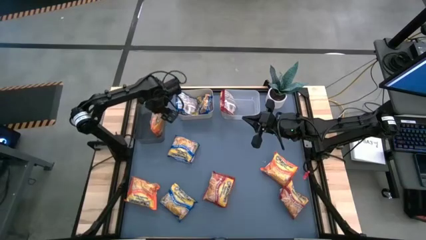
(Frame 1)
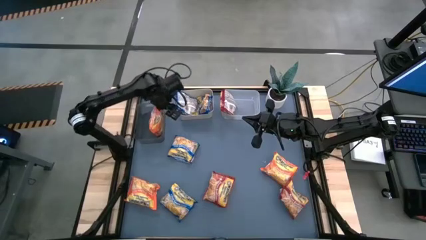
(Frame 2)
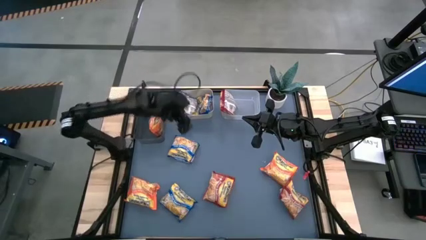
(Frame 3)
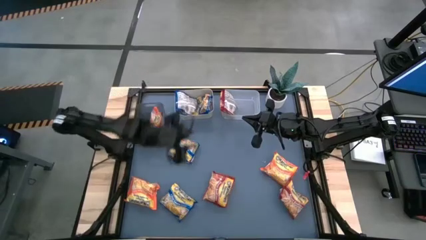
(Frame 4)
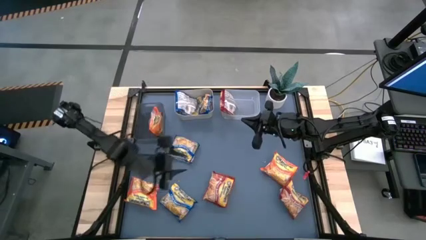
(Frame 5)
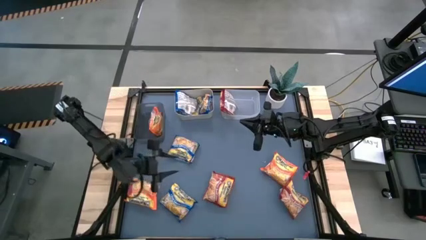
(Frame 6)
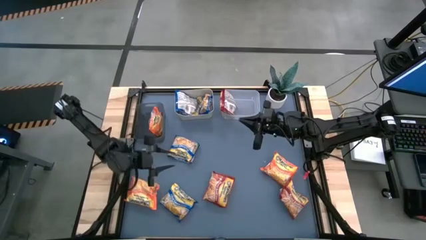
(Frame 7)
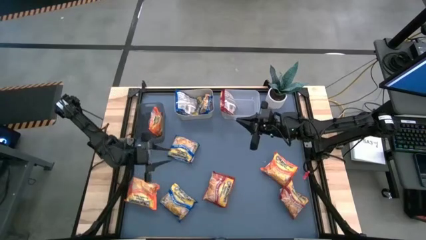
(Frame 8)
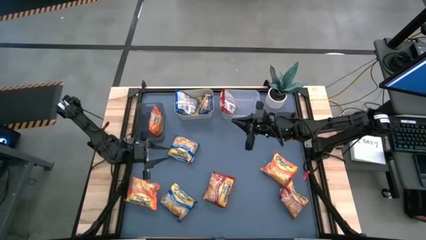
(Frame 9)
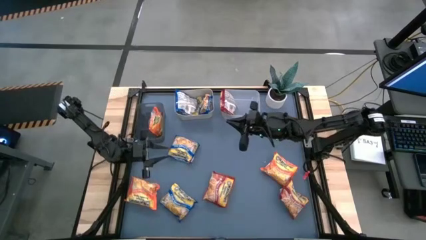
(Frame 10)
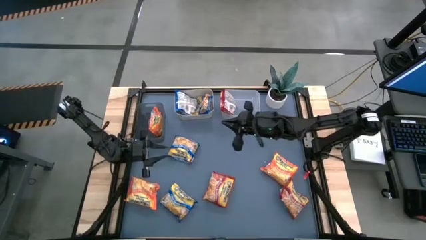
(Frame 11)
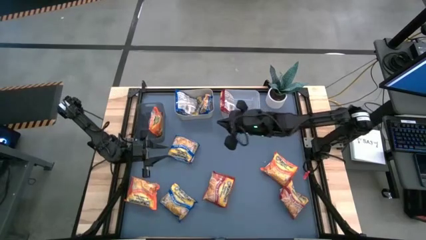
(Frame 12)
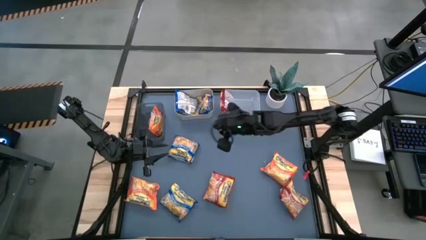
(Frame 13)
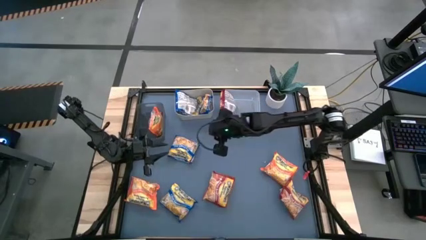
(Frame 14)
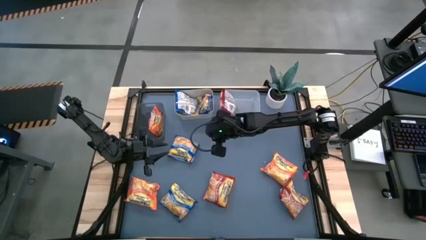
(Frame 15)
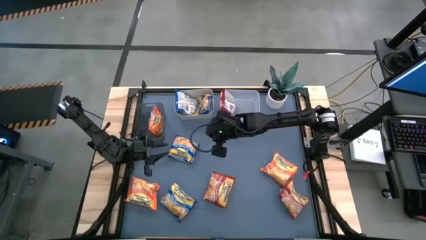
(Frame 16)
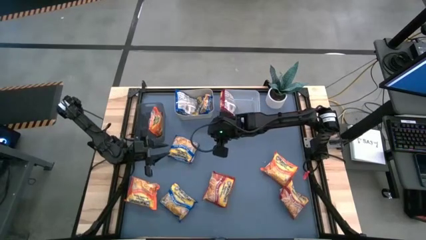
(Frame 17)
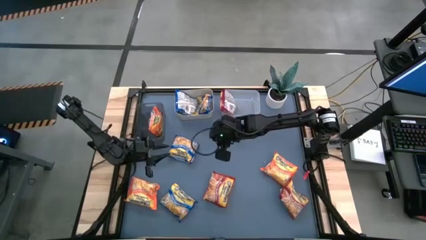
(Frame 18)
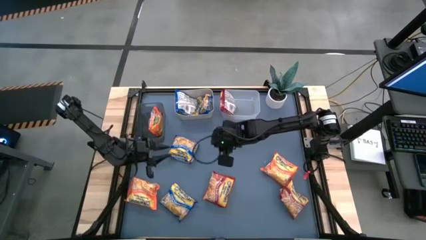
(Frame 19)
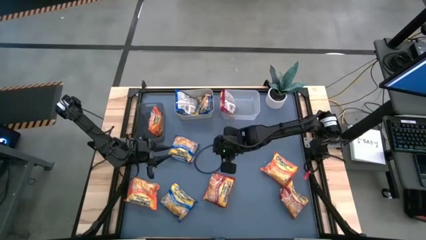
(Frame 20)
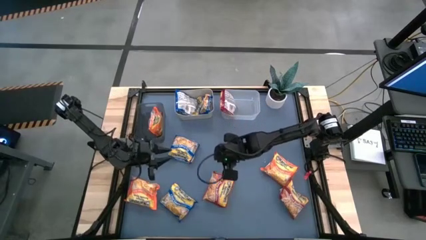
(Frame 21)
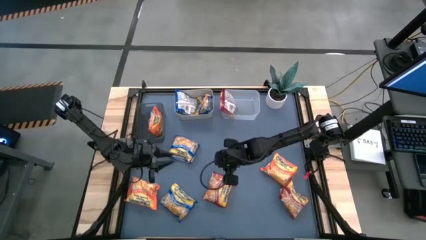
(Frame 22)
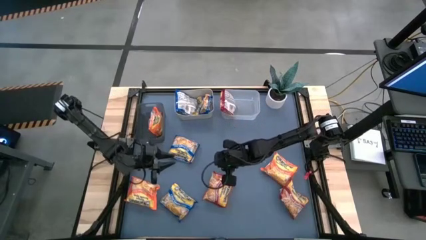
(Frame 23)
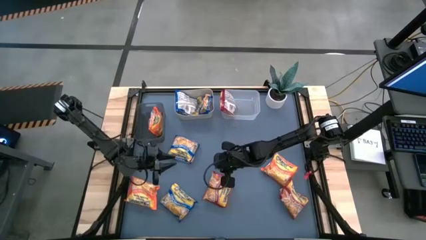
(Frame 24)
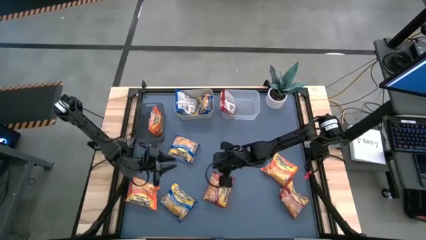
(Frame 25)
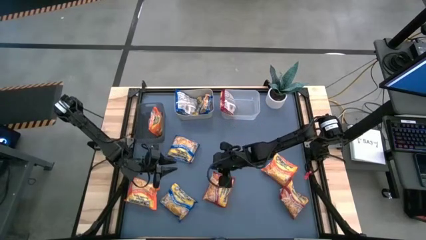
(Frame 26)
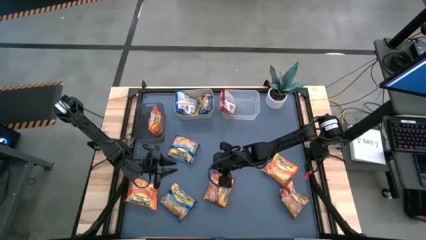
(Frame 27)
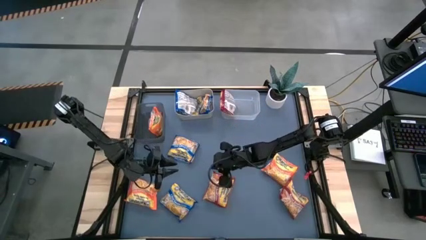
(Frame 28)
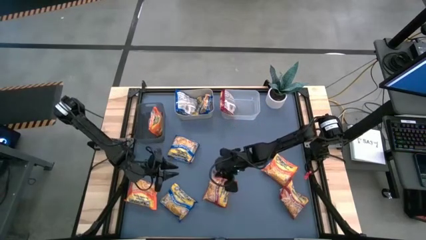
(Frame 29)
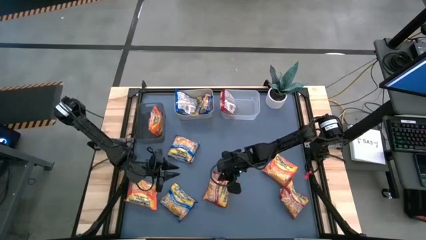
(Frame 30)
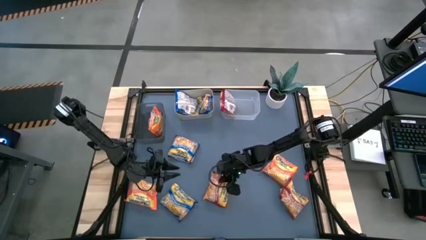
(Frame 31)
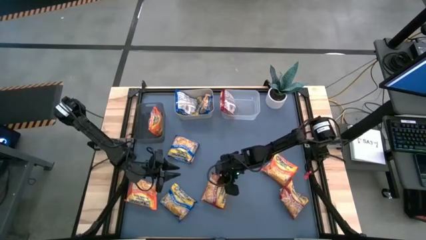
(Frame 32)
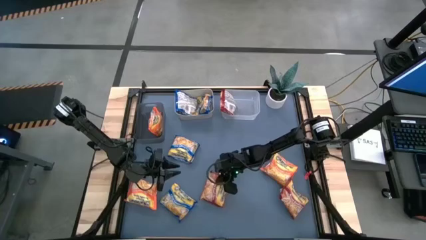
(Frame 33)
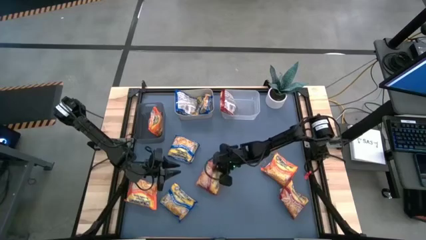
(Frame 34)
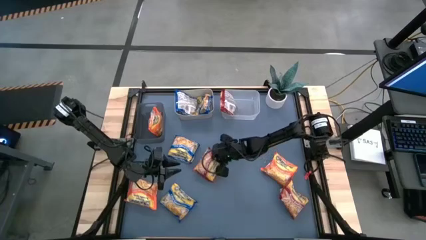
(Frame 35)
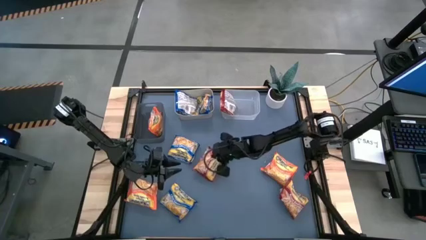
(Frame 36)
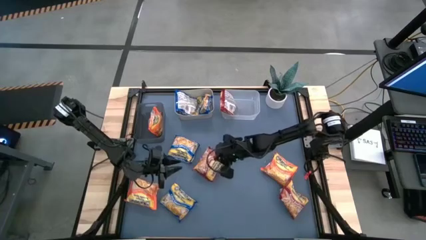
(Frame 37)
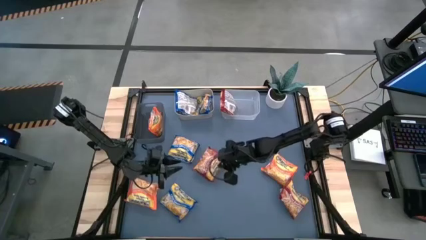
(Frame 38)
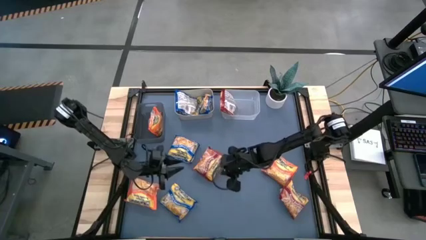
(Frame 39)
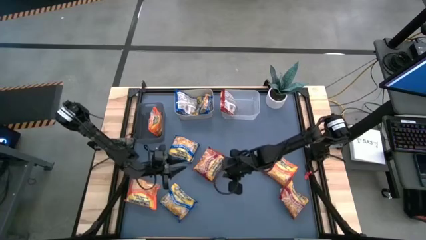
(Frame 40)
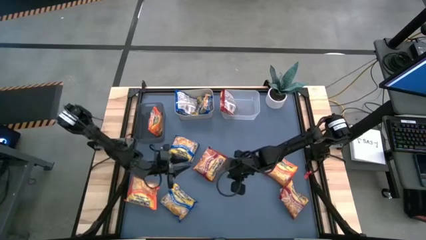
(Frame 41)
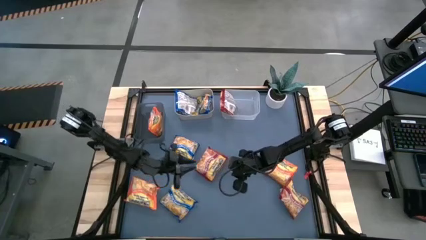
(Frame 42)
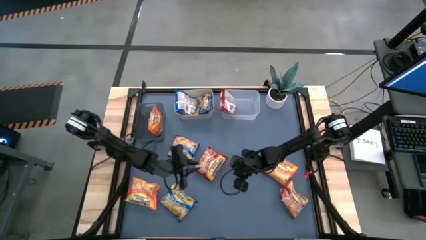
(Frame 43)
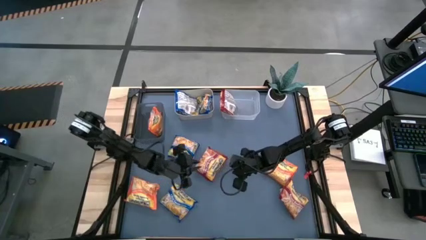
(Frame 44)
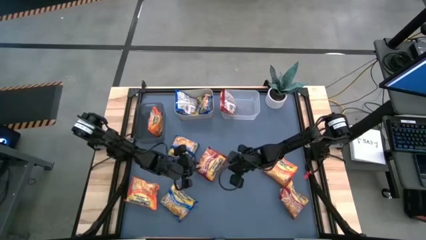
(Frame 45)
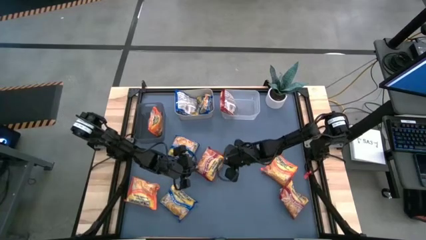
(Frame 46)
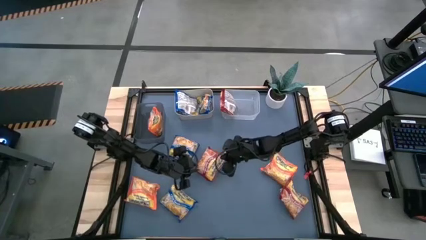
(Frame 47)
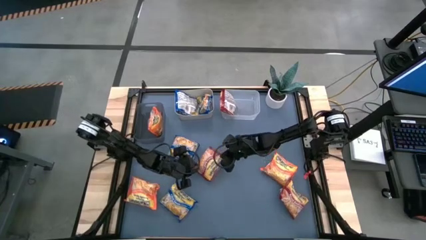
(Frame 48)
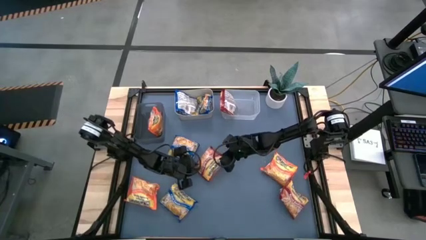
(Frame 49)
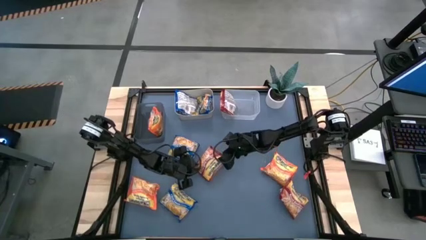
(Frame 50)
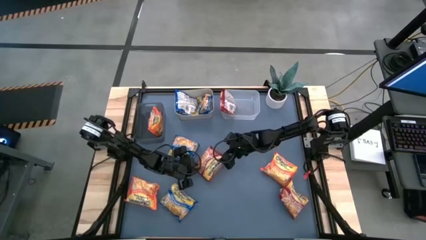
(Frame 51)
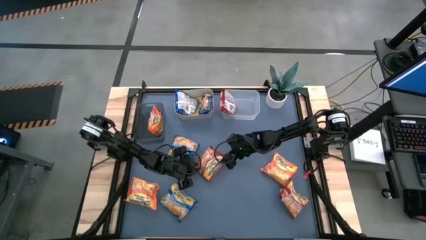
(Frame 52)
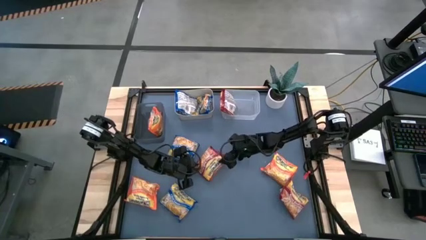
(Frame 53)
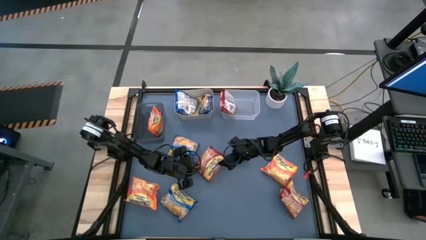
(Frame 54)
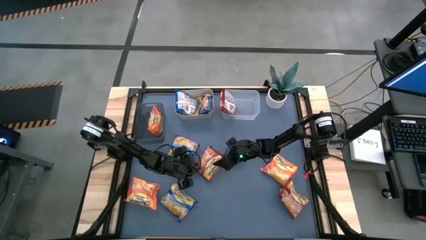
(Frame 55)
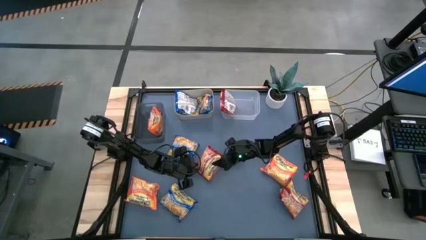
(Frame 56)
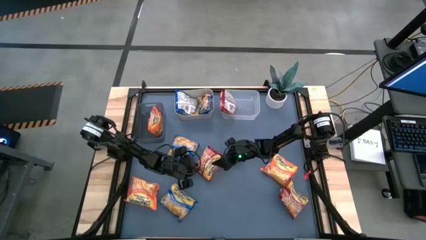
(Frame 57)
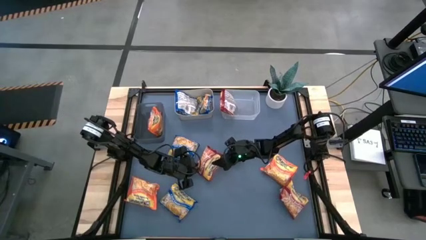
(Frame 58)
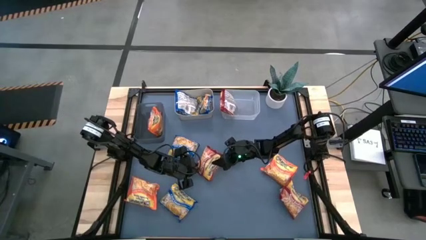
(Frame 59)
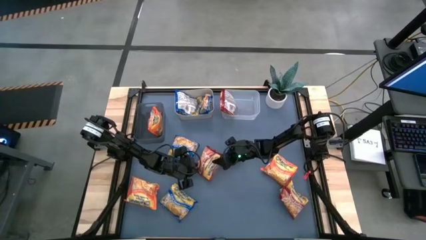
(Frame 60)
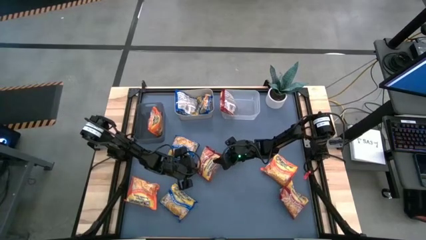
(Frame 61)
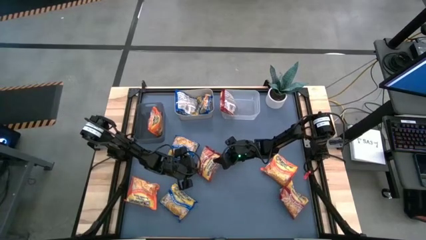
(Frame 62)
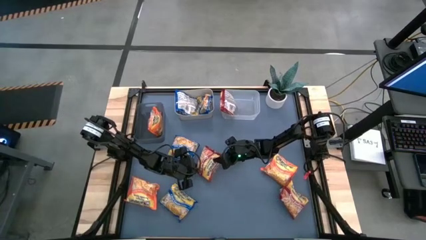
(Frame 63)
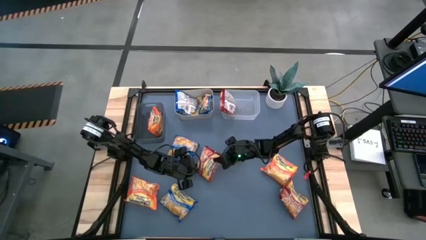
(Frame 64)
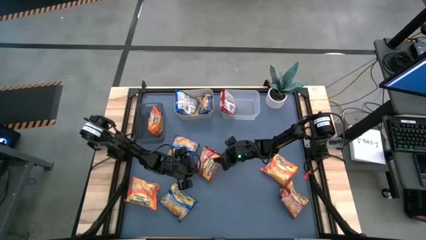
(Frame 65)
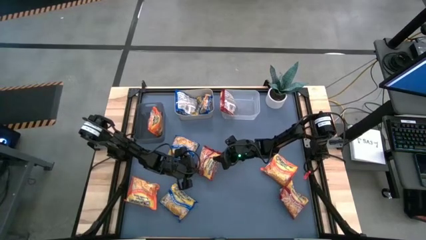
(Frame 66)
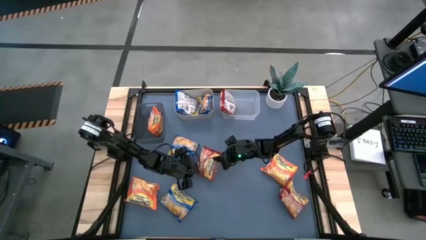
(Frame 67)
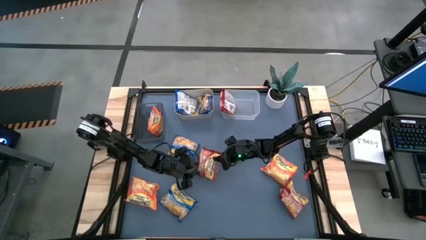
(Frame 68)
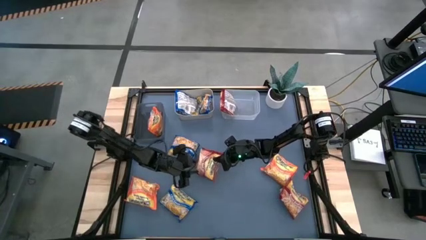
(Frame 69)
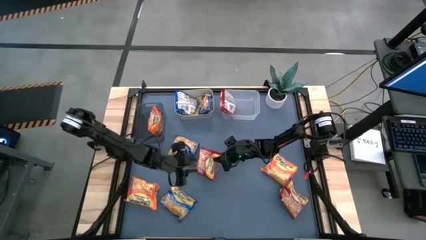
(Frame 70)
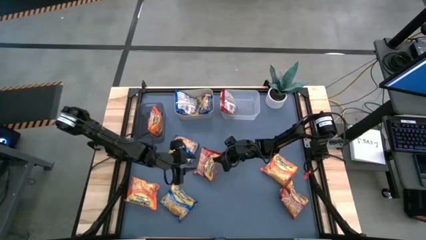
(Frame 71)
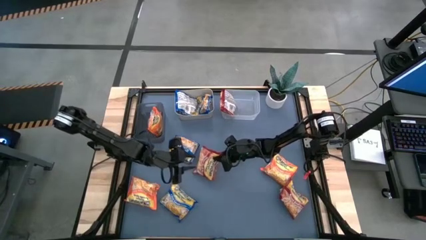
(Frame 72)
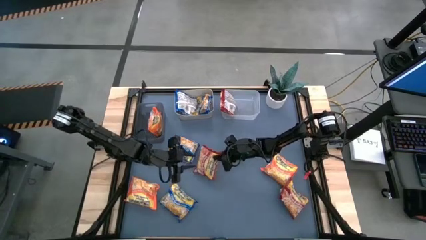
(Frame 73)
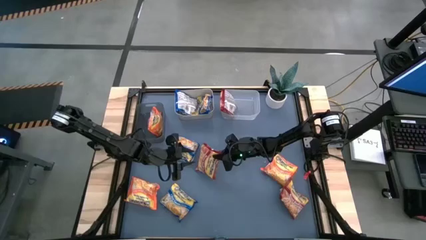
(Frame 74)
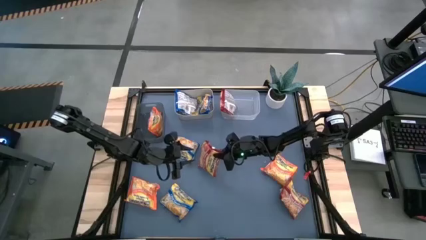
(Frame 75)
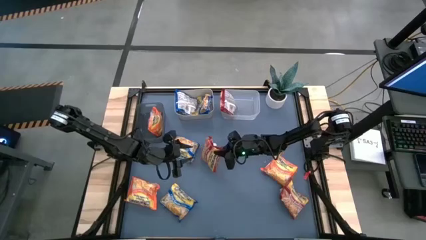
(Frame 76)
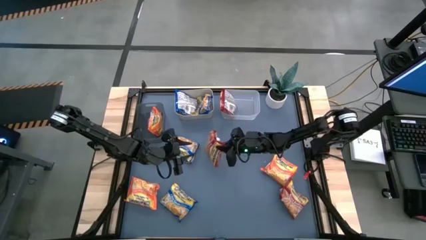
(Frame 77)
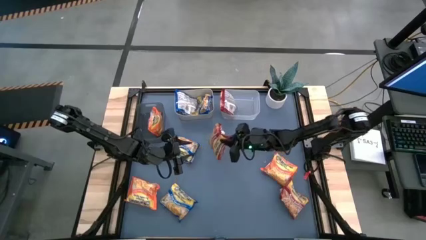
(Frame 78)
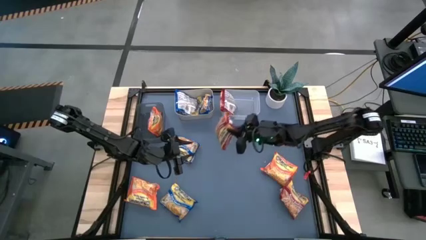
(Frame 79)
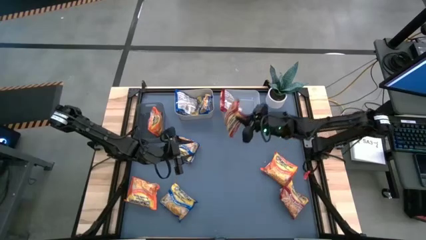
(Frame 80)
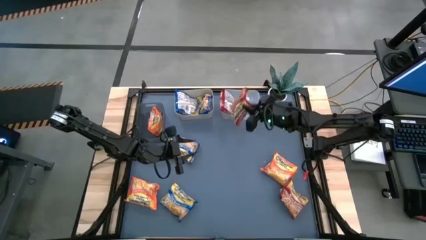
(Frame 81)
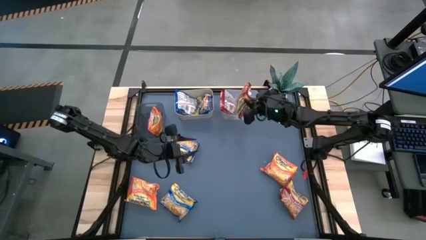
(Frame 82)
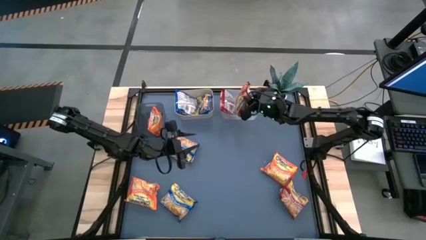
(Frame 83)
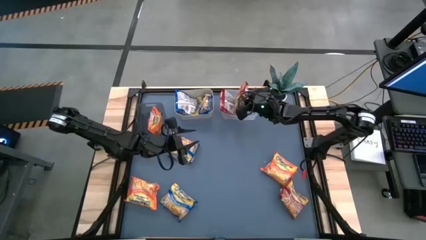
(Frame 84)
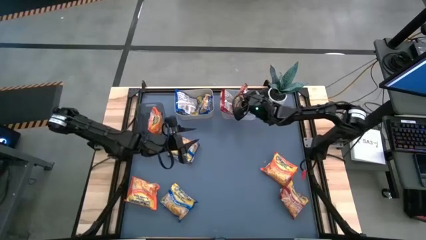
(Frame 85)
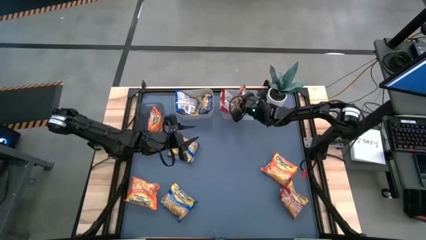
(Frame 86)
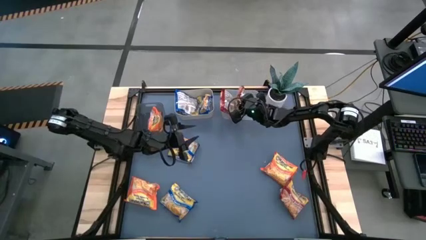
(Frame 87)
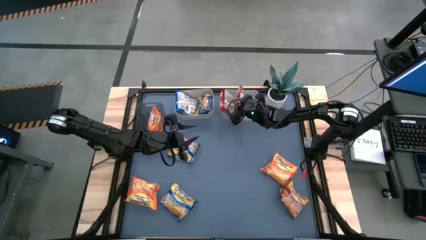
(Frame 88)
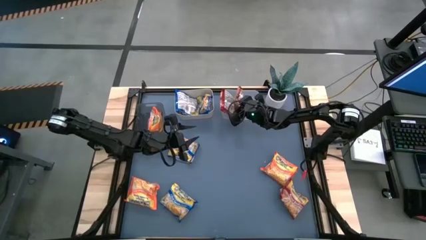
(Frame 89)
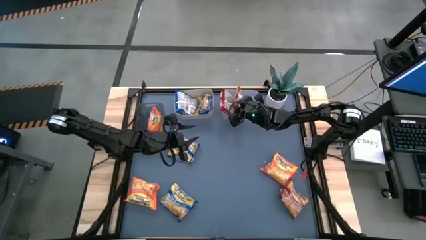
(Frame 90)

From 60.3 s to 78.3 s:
Task: Sort Maruchan noodles
Put the red noodle pack into the transparent bin
